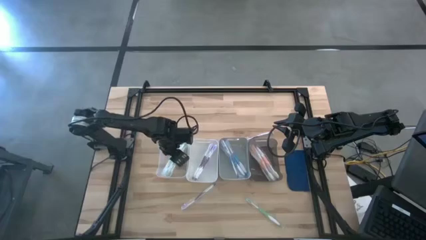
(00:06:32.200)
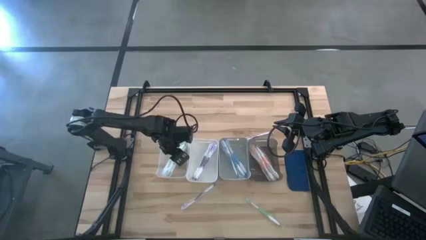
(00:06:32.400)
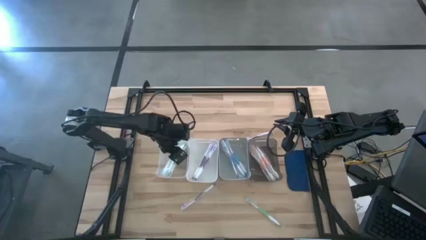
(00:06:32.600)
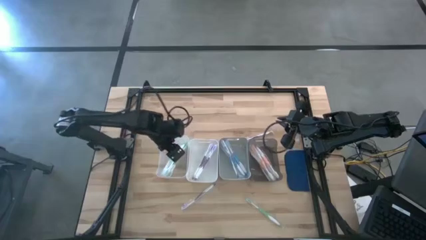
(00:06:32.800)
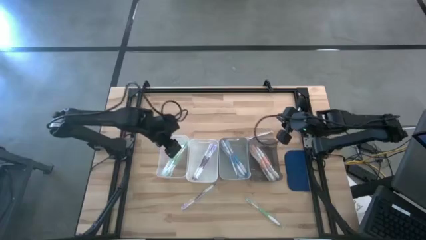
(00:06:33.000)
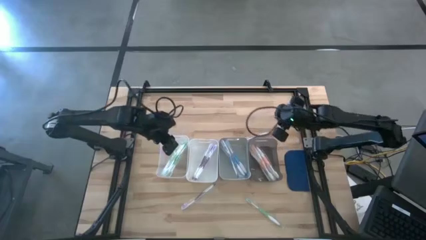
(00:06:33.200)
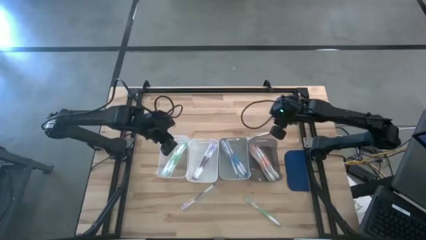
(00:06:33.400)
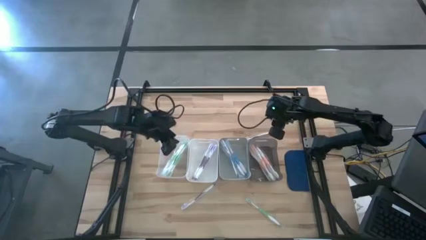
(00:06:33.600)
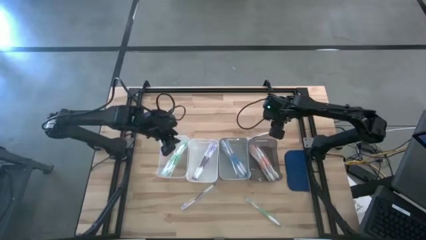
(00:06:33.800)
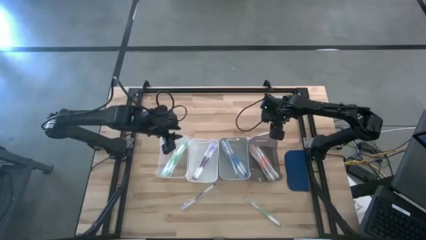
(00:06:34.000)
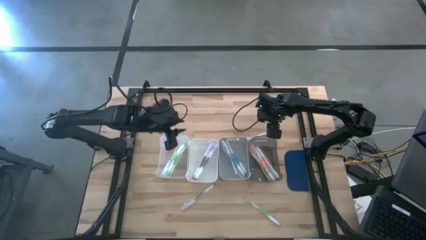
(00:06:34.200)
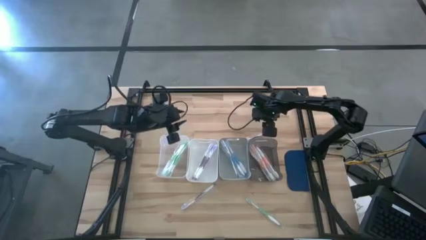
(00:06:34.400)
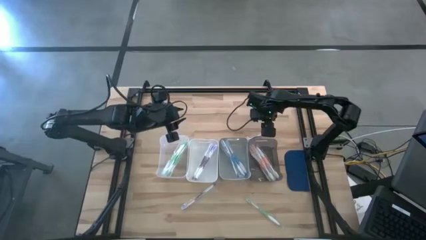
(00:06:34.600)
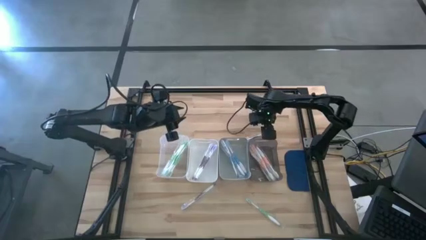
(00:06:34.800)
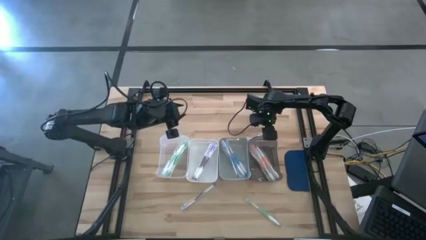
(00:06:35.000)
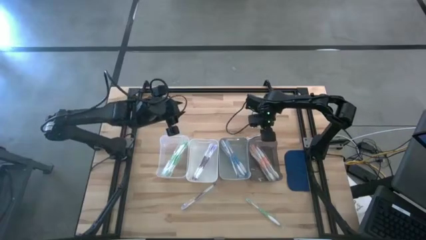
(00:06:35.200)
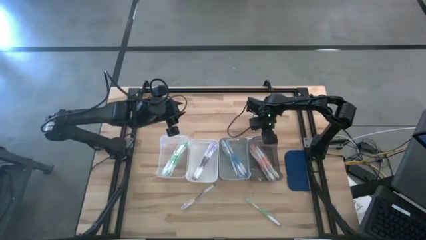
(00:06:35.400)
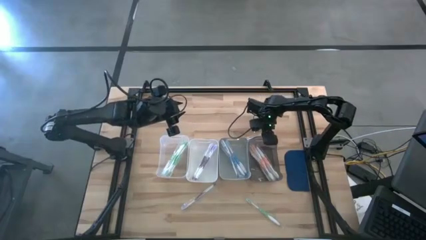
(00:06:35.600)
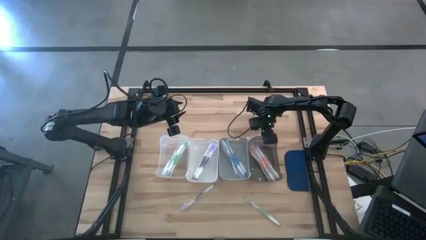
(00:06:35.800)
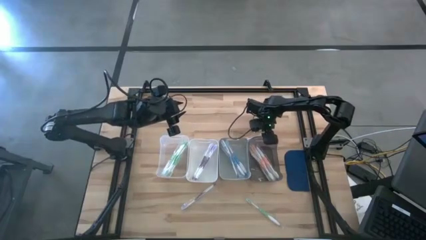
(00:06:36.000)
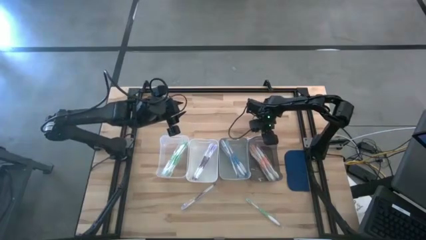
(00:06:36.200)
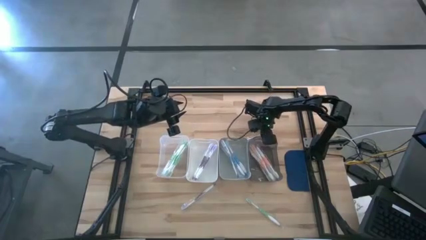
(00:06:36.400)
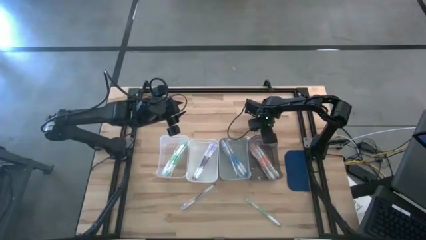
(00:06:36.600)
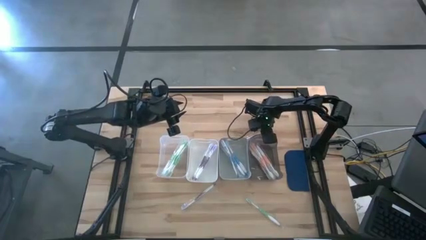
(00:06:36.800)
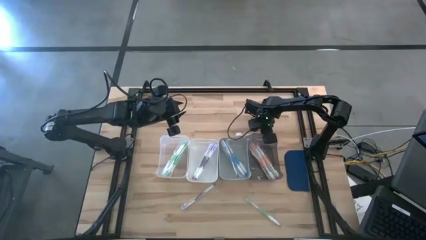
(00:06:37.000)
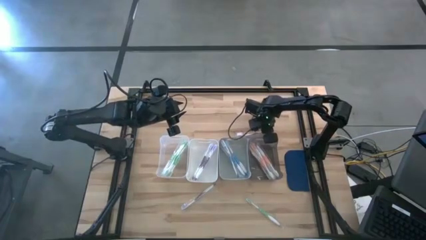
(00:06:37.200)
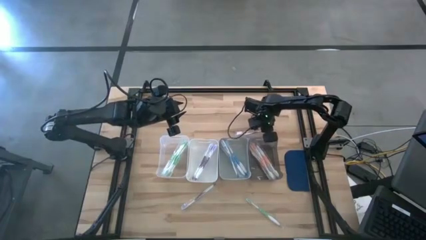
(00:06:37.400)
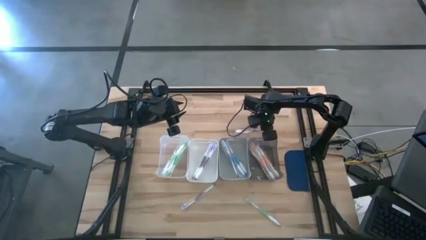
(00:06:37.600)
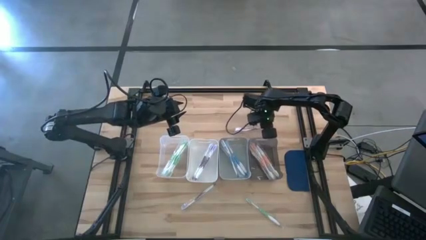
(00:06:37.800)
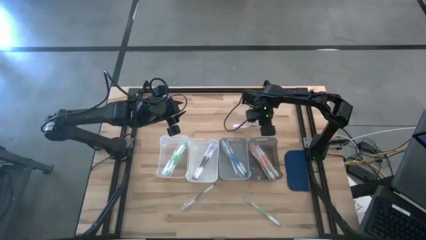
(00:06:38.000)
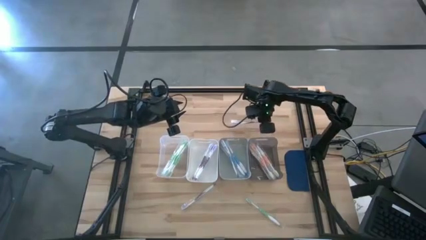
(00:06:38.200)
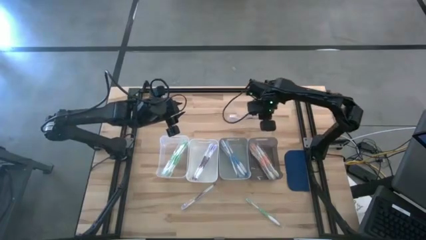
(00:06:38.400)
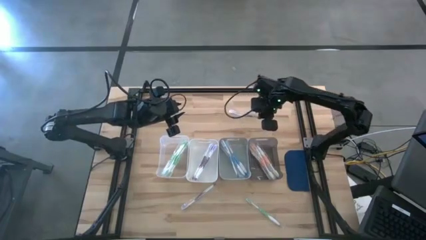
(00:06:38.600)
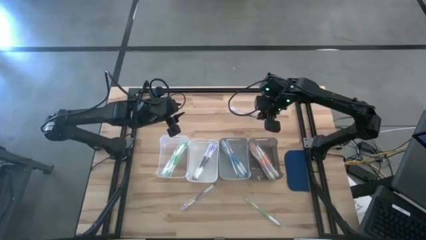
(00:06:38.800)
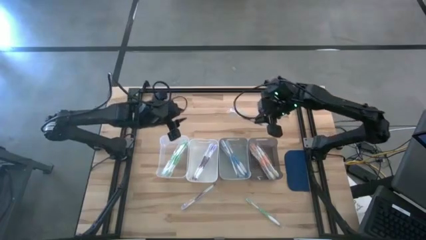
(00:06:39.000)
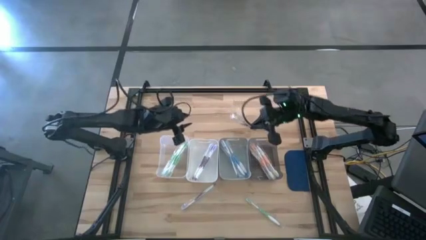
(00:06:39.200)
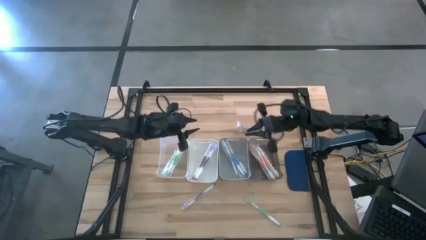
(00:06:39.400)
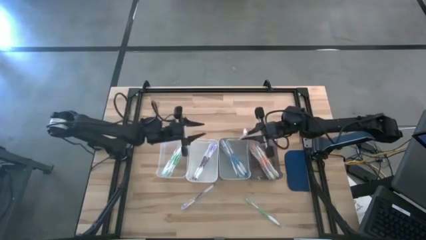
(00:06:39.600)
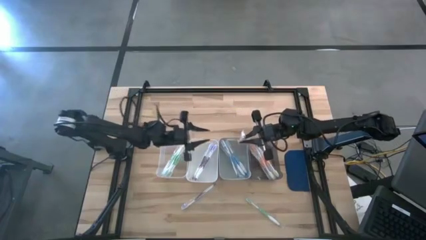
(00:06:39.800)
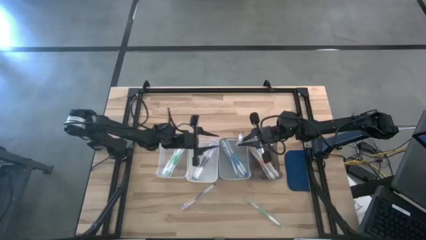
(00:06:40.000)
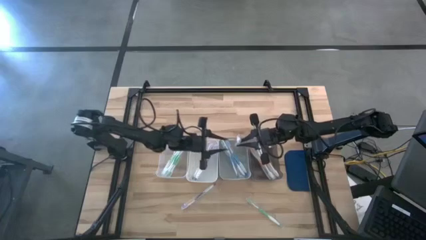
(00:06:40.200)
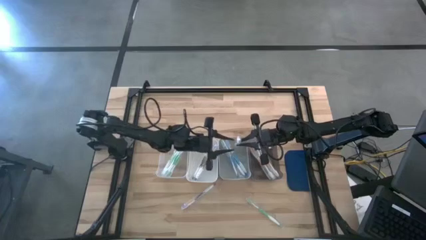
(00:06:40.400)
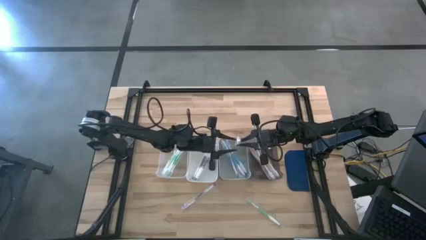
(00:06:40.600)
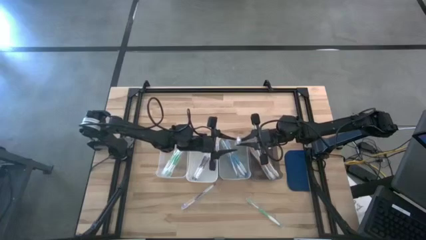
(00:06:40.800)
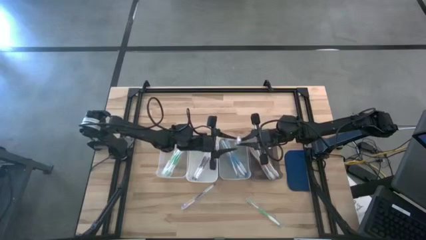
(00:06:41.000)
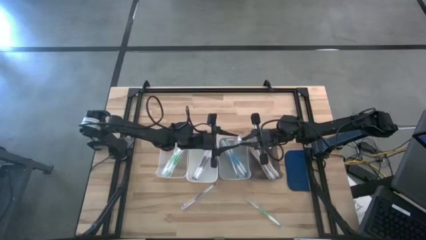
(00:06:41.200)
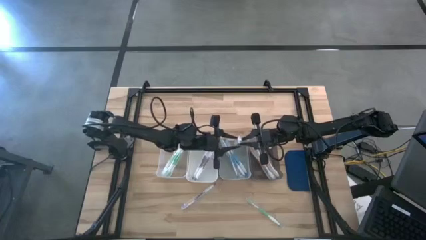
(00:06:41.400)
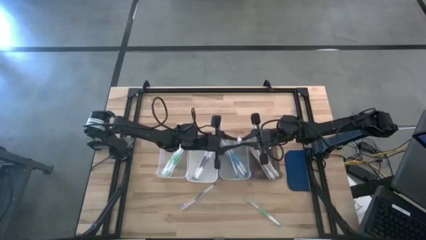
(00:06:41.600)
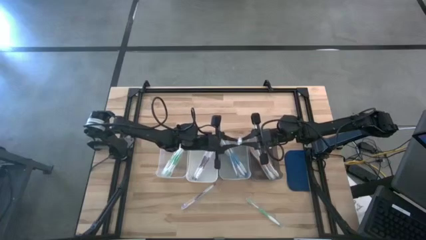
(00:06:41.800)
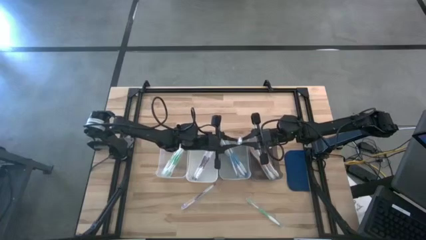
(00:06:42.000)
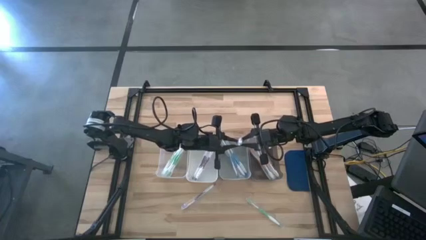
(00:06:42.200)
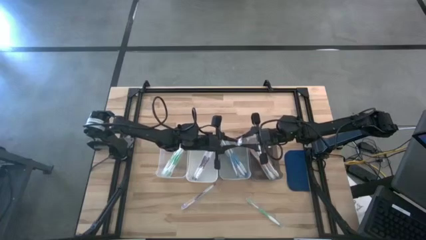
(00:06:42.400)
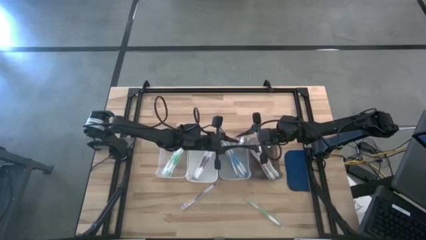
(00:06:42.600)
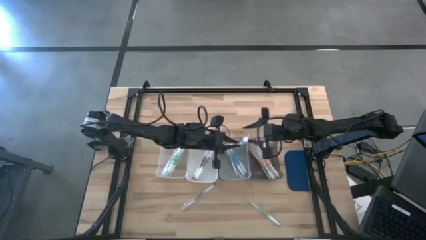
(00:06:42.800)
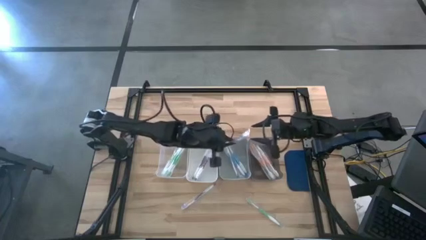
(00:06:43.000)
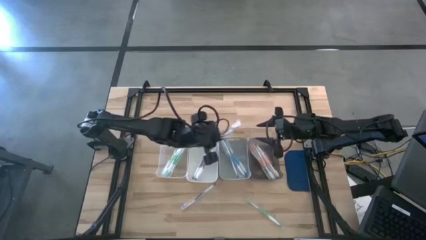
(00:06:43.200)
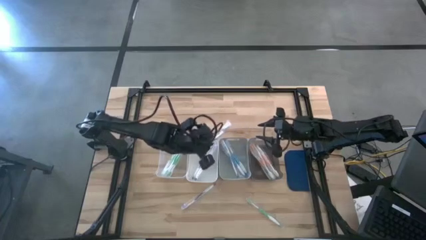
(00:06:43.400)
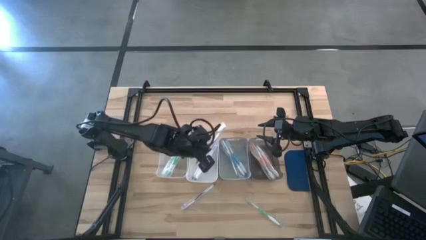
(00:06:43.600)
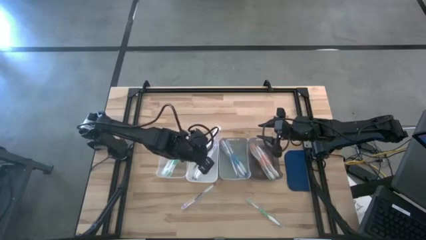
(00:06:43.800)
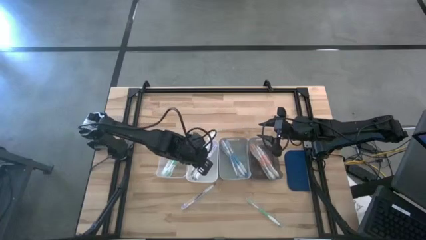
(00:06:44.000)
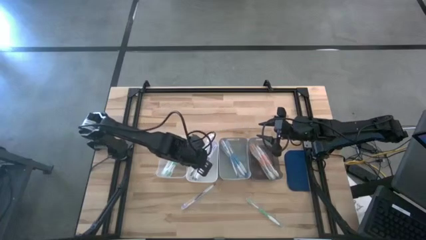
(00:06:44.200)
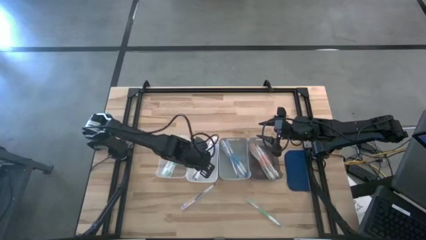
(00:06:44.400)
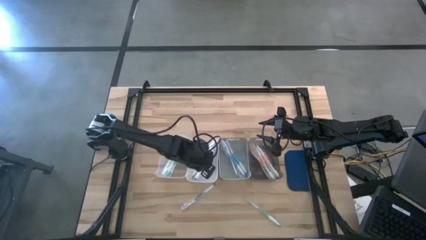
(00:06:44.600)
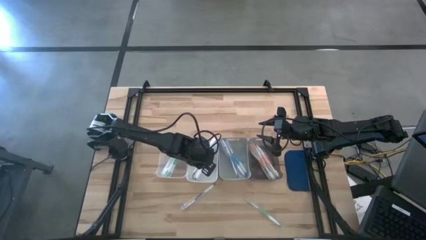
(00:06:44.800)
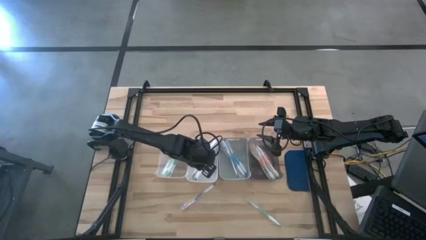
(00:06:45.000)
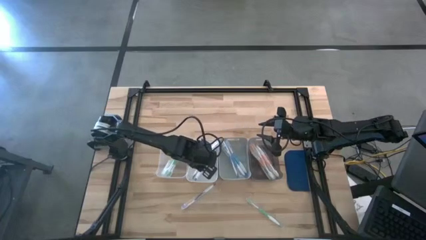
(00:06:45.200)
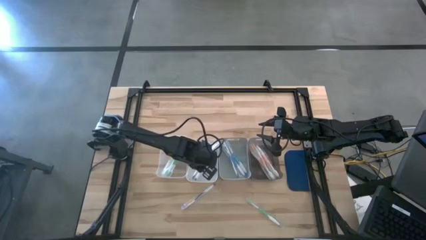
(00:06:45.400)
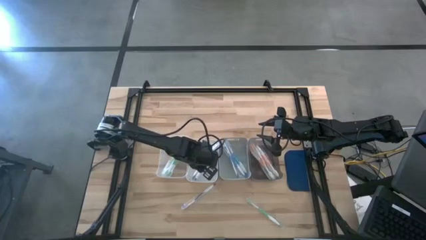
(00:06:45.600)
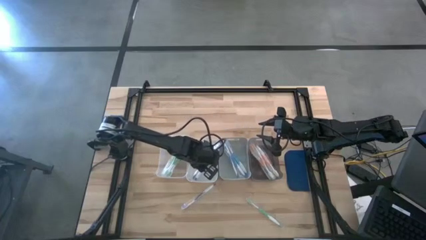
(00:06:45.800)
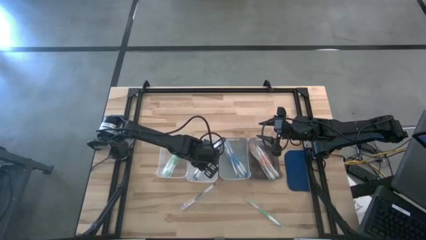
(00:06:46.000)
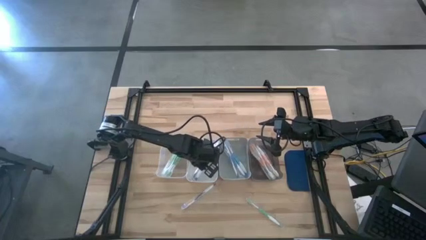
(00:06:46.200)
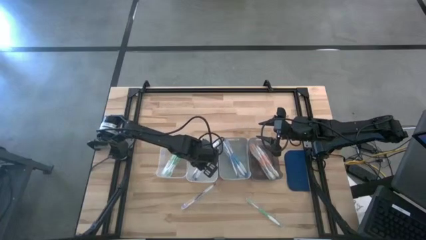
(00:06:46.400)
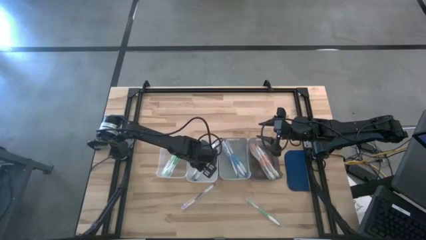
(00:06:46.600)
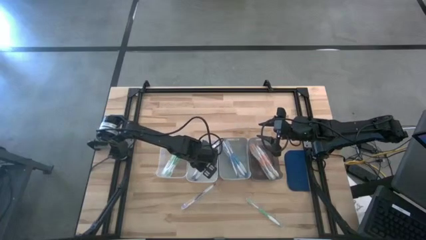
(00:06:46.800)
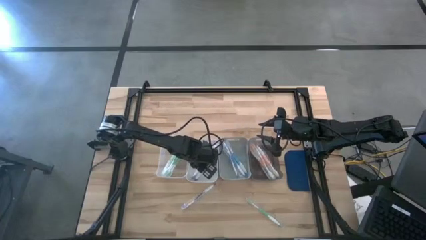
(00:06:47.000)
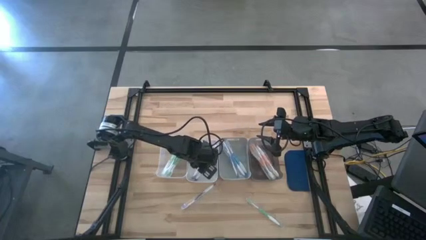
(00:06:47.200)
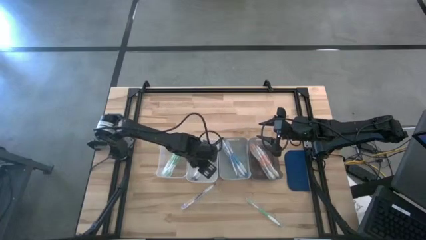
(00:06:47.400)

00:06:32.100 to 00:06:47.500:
Task: Pick & Place Toothbrushes
Put the purple toothbrush into the white bin
